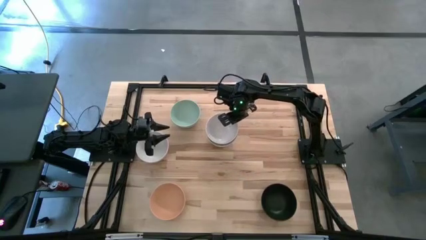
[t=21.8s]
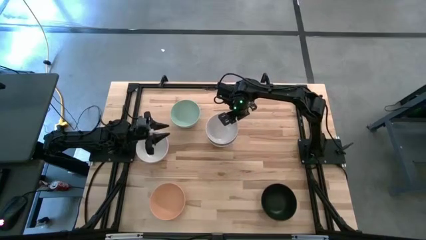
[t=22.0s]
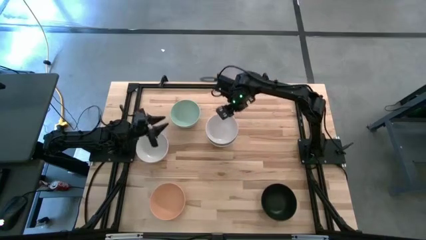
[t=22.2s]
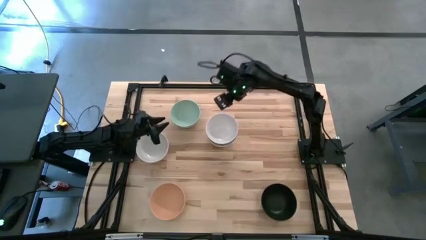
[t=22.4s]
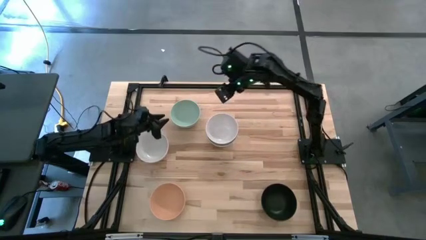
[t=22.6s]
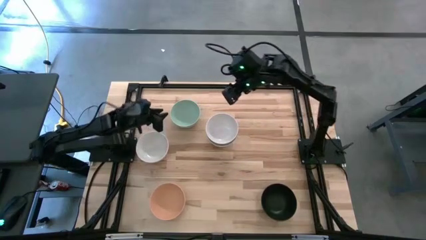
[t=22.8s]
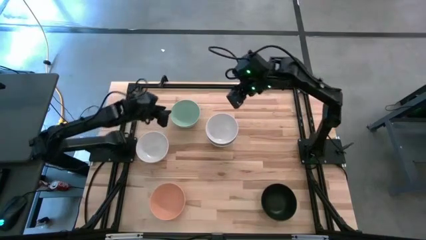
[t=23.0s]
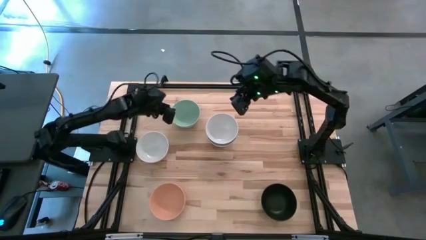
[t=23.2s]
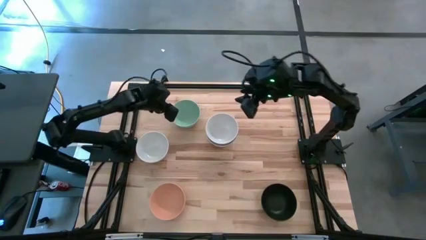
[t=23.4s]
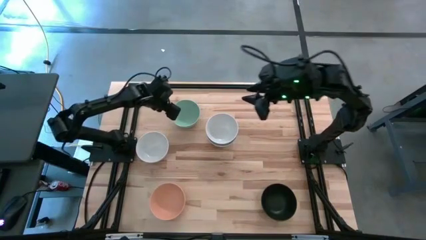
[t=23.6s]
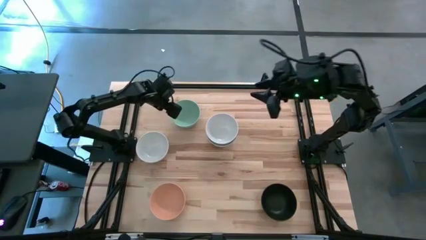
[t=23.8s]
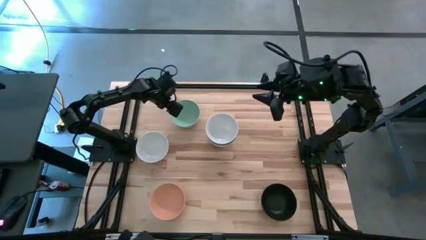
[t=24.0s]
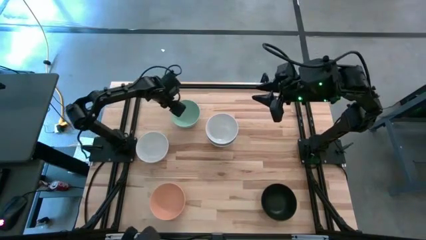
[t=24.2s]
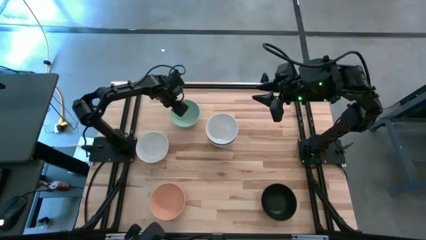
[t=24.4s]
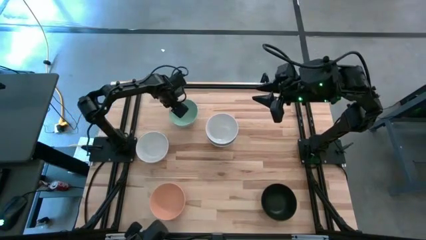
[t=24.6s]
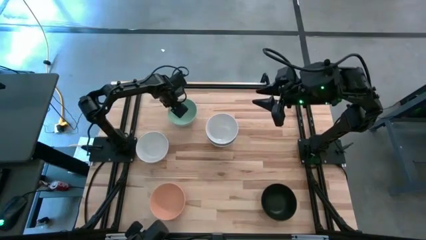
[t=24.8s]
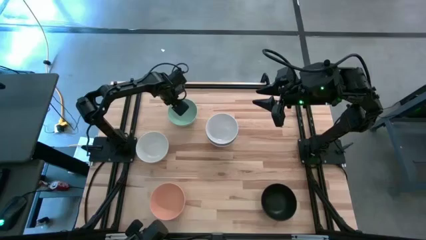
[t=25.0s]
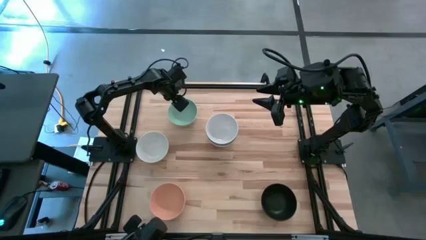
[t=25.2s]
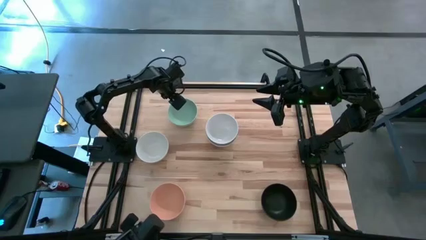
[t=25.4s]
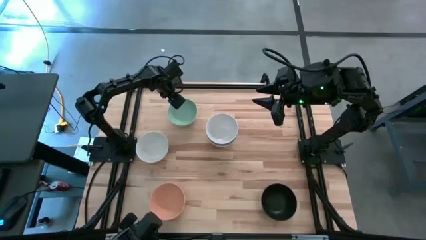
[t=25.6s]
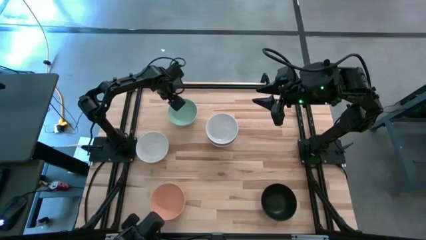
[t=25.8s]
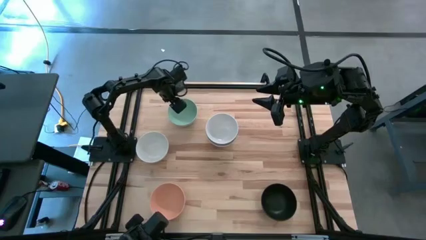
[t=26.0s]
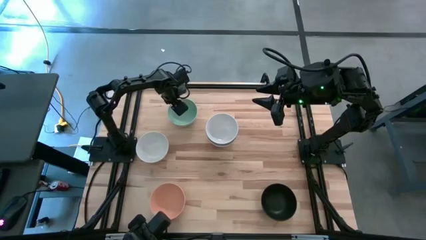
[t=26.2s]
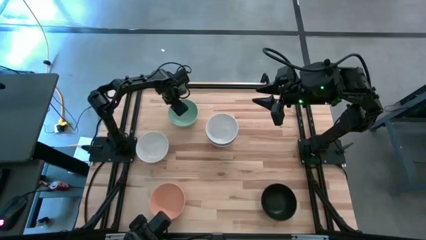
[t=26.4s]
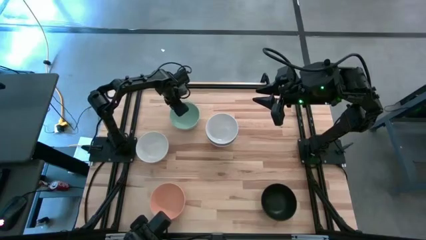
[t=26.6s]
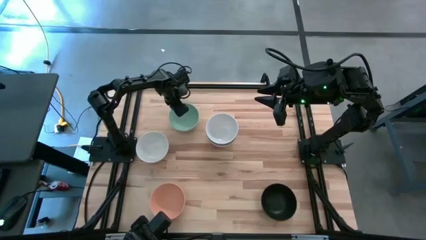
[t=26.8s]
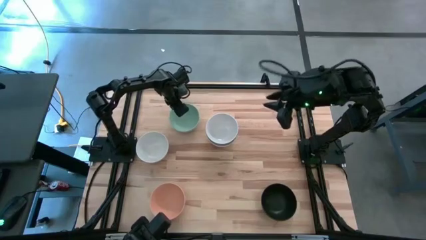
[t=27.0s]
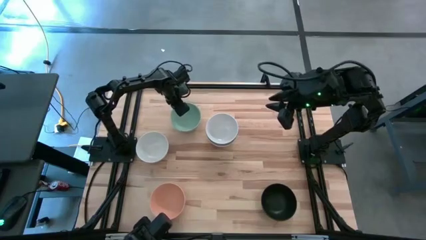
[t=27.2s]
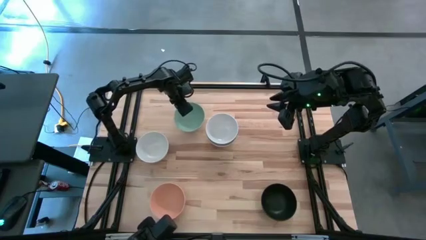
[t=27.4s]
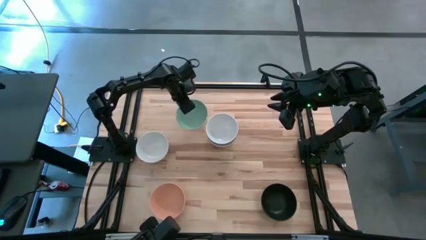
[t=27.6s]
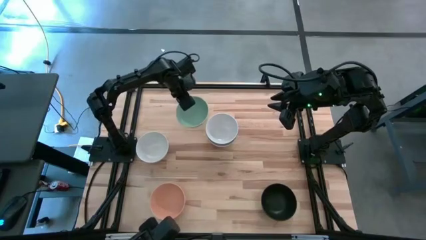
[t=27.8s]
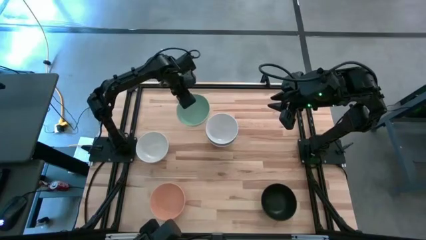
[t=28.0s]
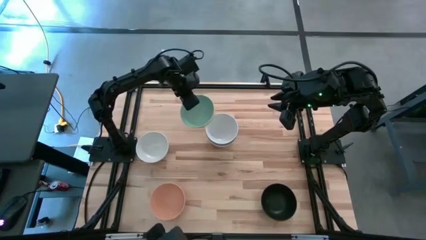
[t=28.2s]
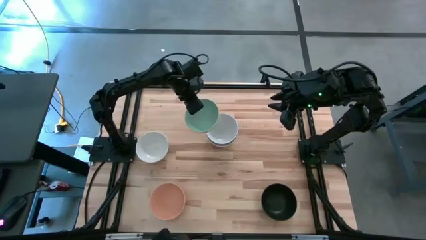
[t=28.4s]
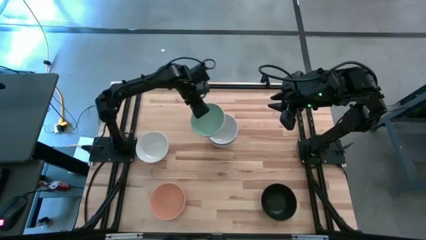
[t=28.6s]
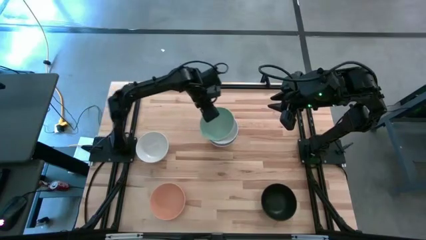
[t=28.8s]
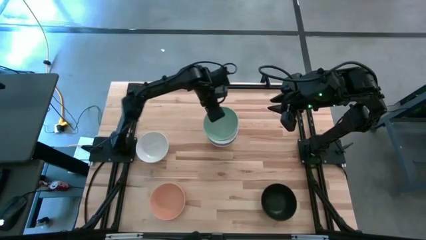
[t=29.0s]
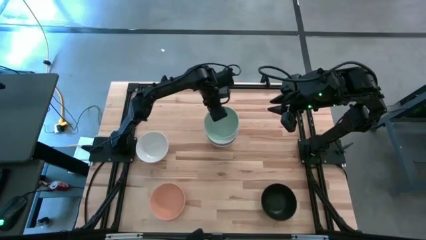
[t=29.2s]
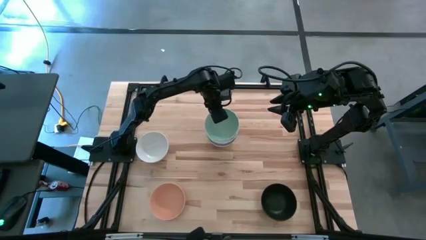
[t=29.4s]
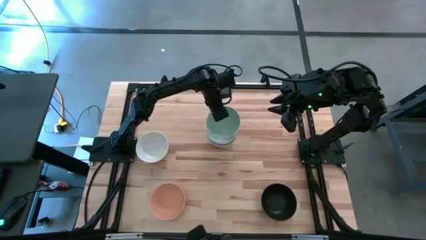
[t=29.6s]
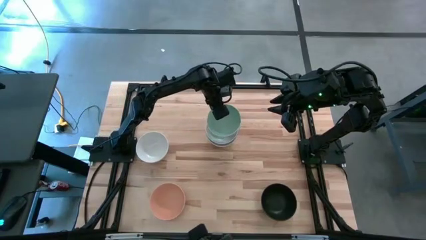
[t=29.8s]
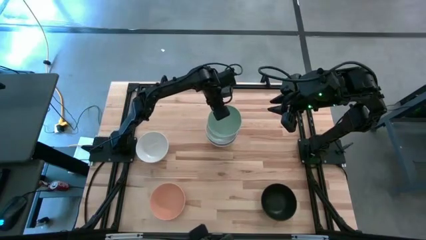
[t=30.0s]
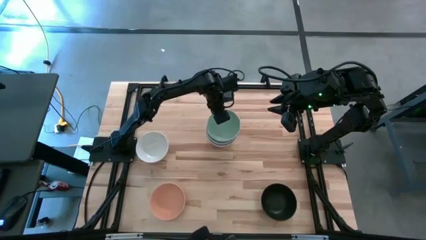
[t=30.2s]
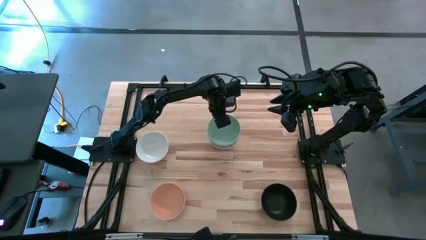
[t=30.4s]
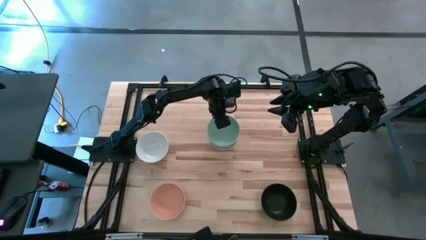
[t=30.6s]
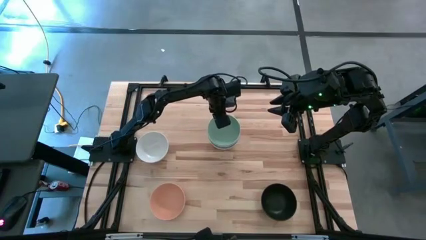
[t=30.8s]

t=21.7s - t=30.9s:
Task: Nest bowls inside each other
Stack the blue bowl on the white bowl

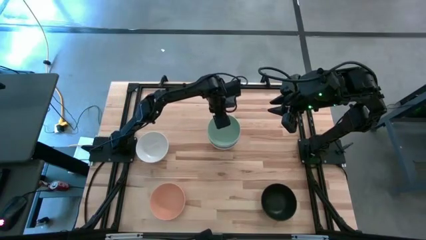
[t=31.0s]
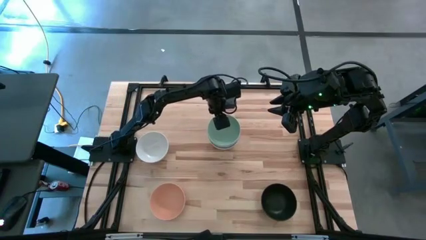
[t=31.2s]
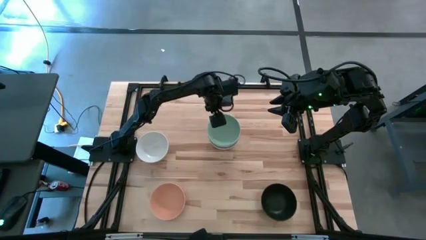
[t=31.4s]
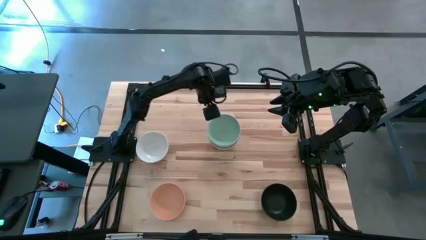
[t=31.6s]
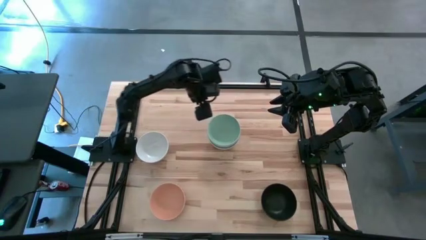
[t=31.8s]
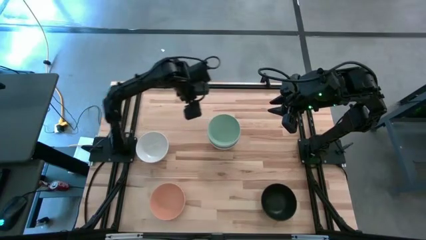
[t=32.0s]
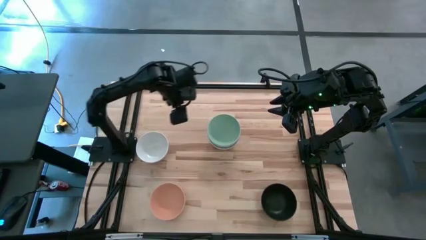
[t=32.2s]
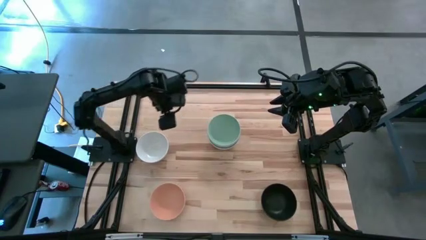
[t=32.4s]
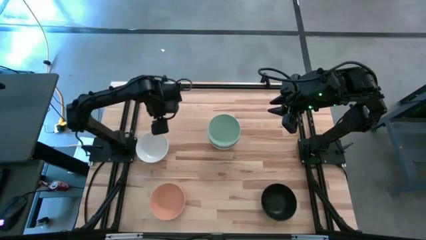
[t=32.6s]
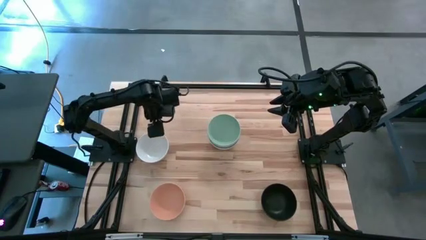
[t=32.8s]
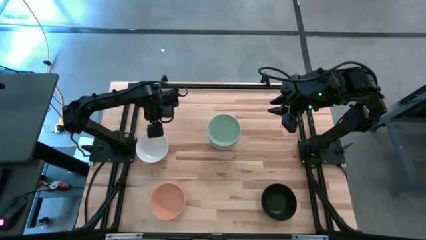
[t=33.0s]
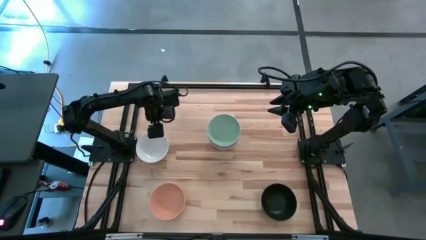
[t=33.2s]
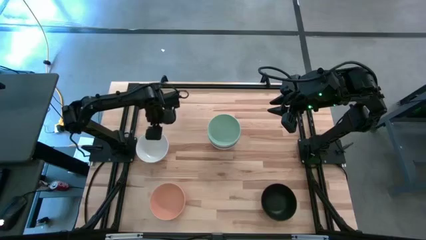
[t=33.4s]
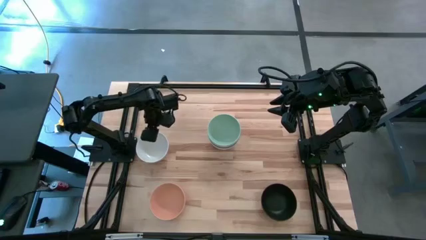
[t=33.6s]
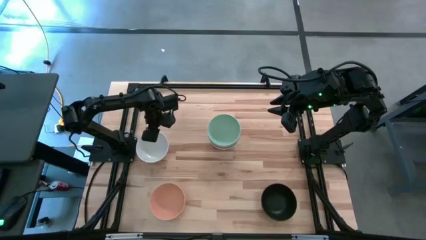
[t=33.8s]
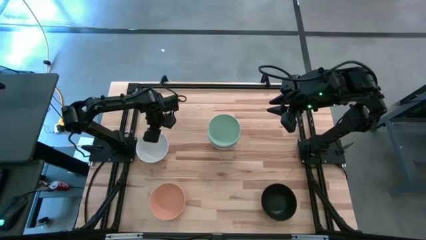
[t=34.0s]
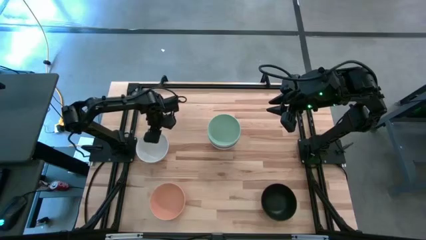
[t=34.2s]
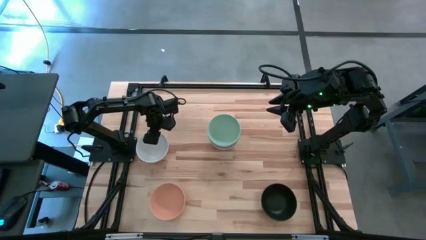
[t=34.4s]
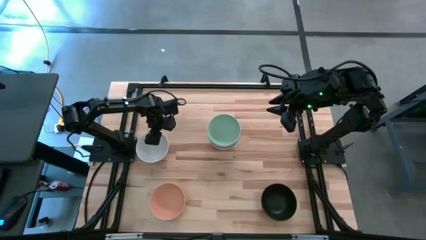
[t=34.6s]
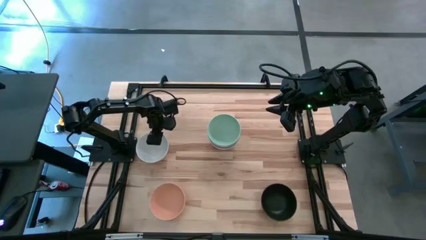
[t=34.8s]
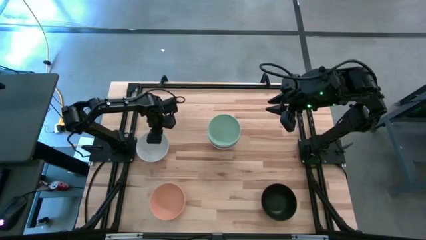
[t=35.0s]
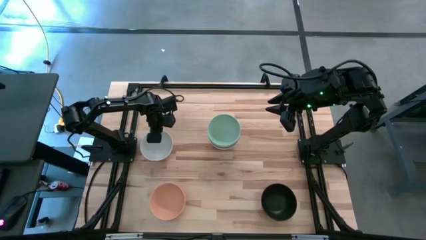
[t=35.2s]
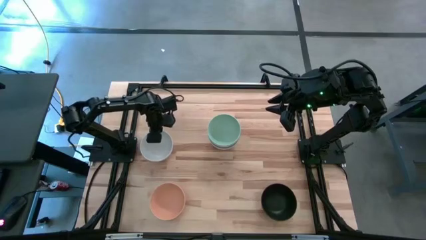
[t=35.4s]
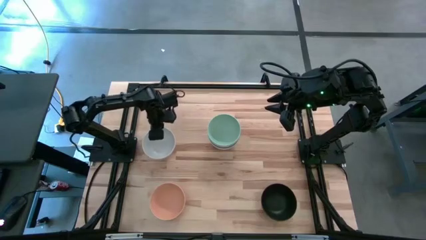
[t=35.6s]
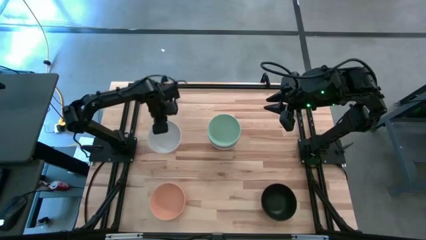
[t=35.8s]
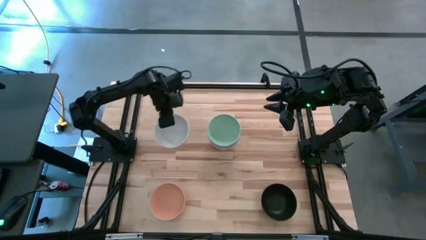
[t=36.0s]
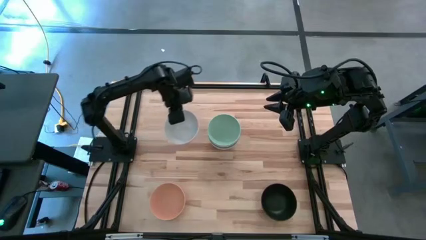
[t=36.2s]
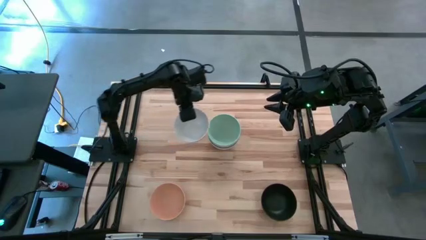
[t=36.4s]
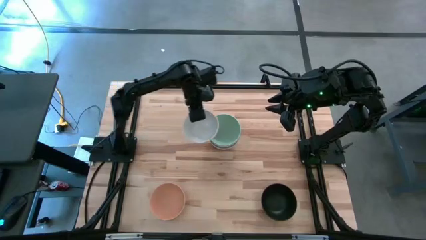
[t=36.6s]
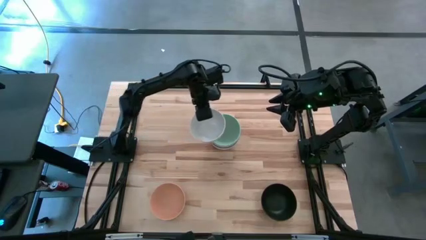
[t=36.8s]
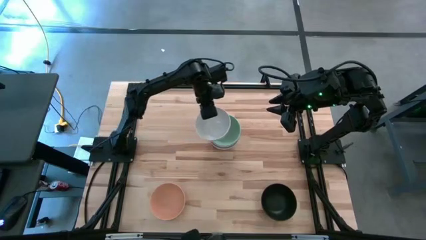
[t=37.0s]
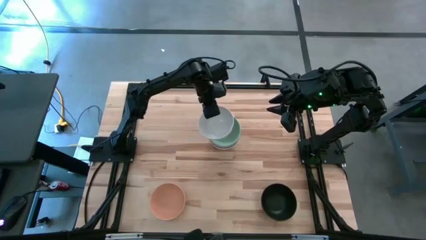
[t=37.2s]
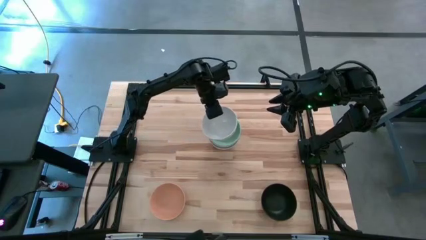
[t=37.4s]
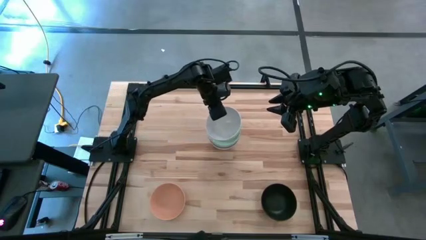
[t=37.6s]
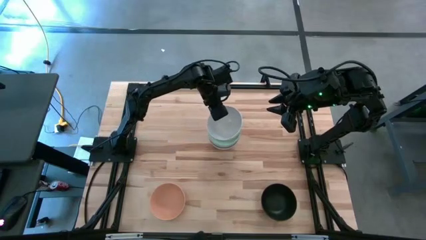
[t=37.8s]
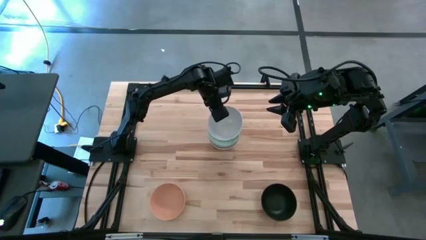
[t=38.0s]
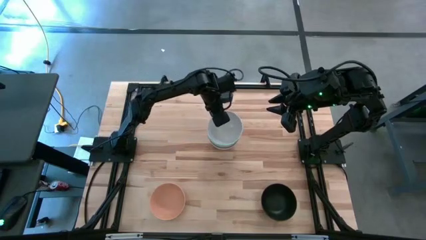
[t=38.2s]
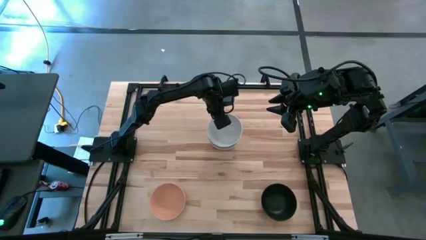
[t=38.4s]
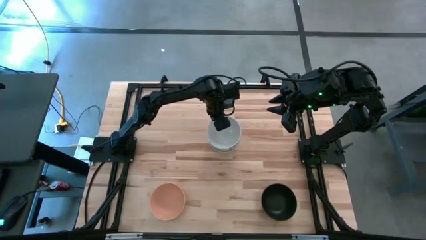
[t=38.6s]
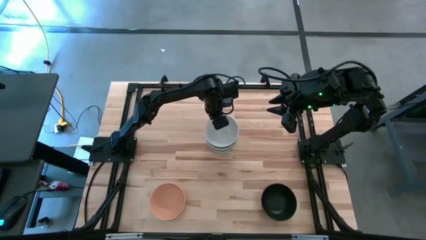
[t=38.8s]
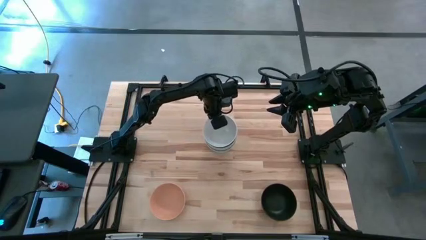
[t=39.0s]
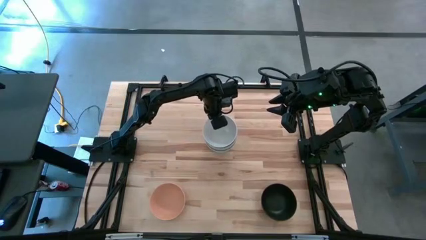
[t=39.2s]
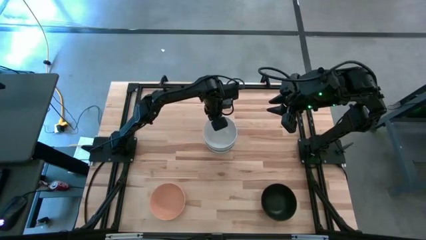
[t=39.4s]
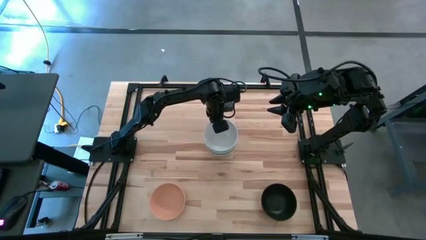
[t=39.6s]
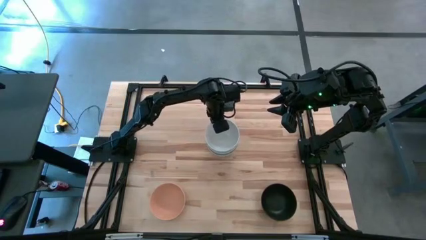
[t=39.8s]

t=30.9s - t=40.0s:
Stack the white bowl on the blue bowl
